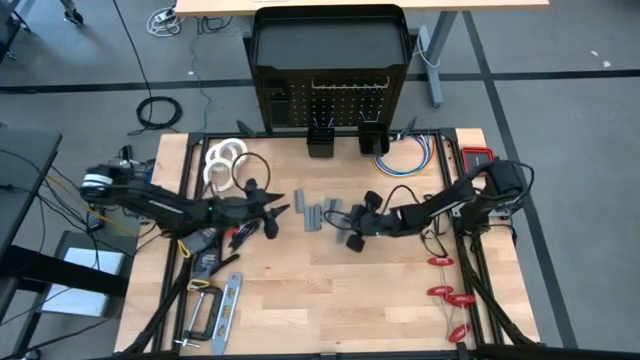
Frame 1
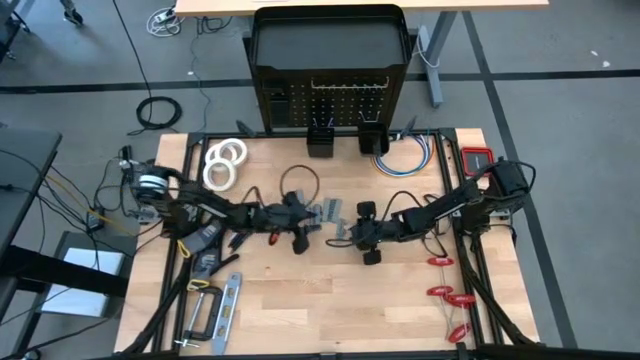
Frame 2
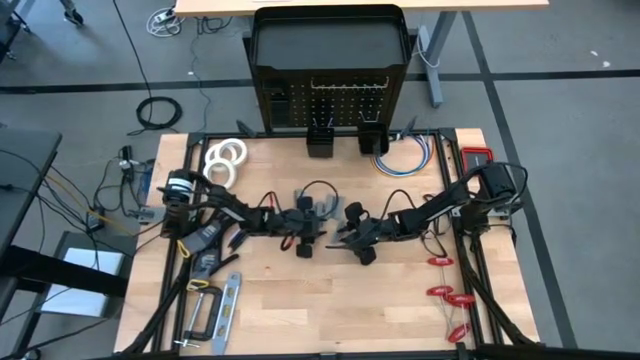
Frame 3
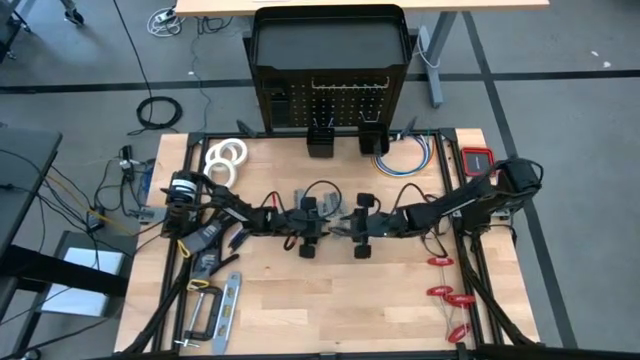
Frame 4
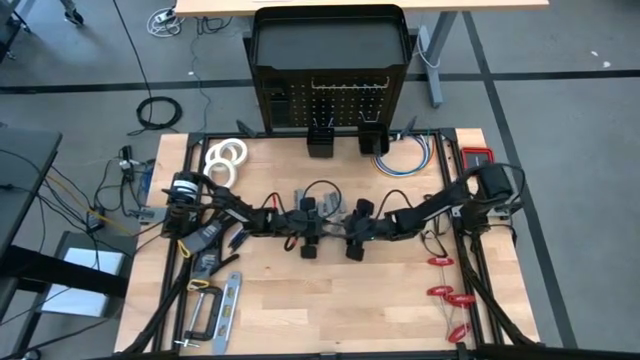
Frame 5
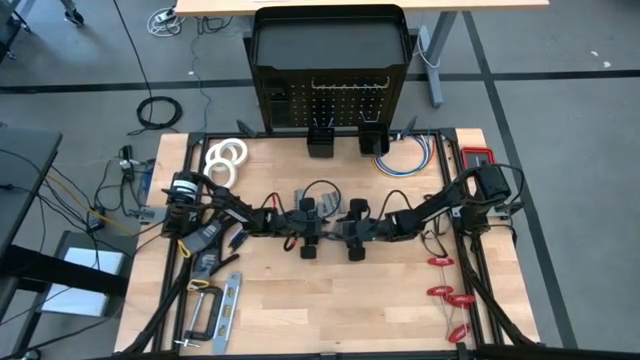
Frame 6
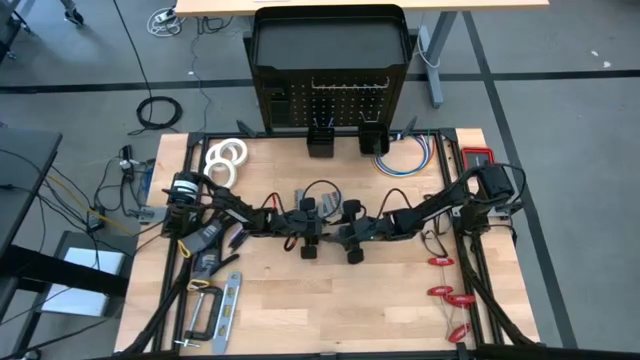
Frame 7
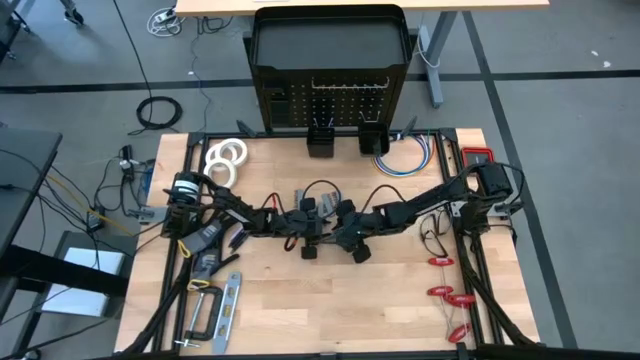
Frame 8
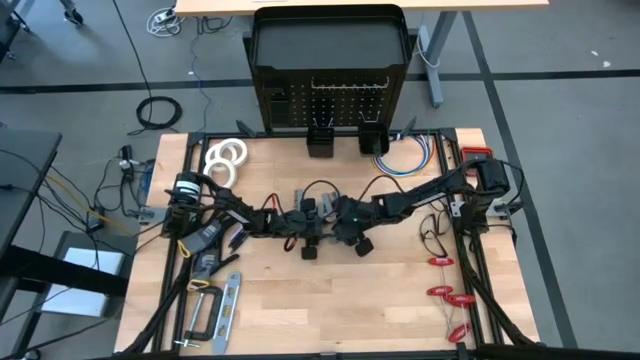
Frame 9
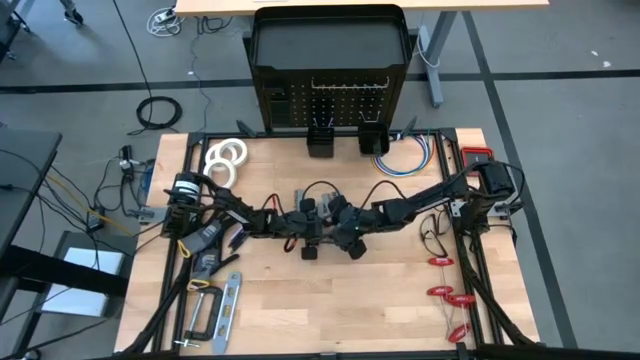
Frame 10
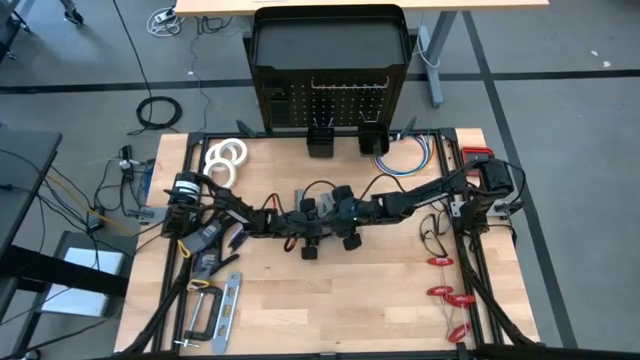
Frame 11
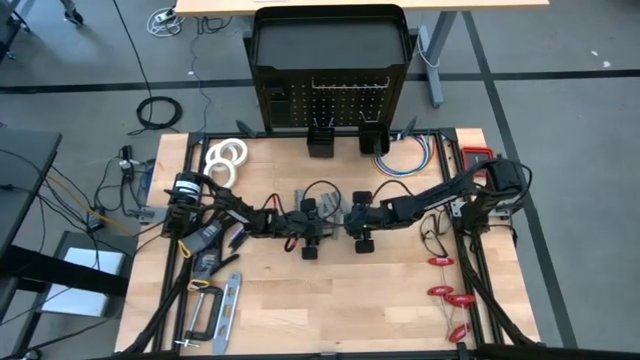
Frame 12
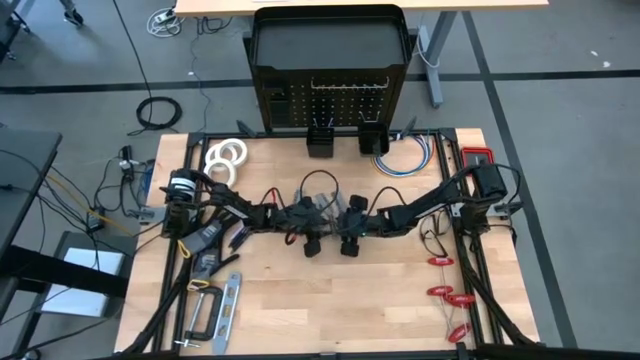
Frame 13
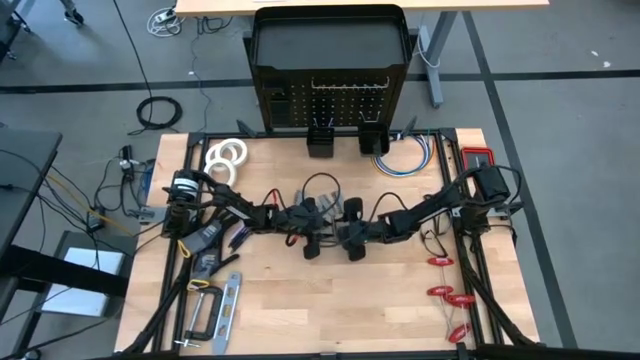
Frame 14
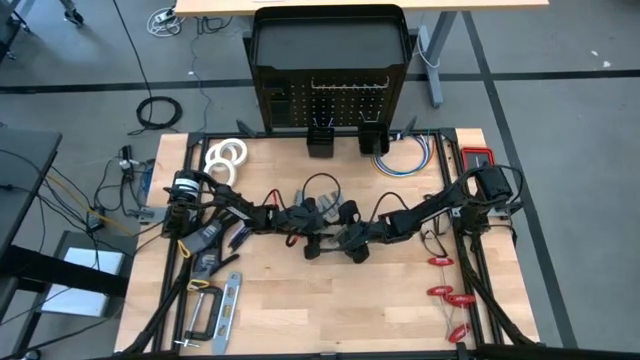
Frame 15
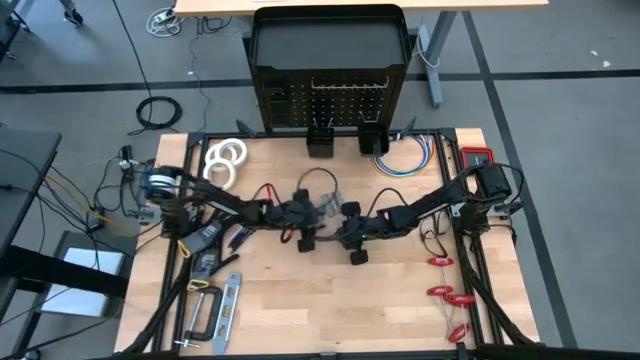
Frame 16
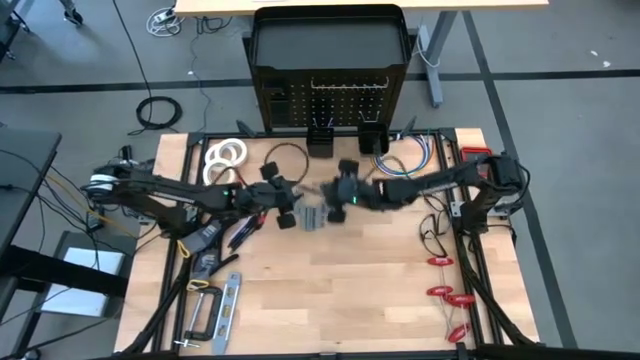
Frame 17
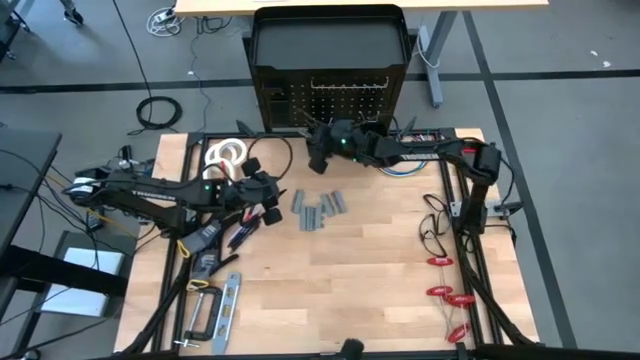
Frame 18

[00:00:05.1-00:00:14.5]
Task: Hang tools onto peg board
Put the terminal block into the left peg board bin

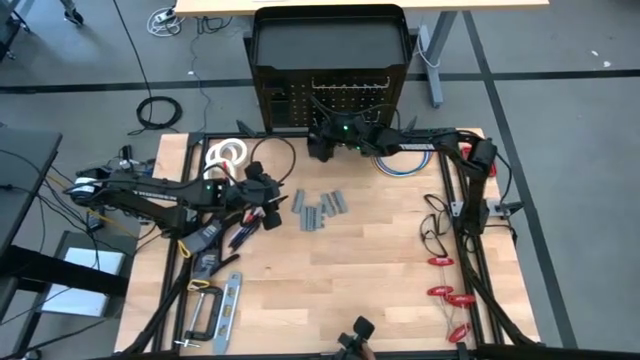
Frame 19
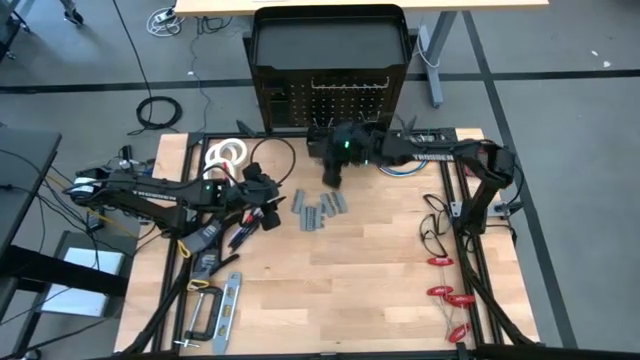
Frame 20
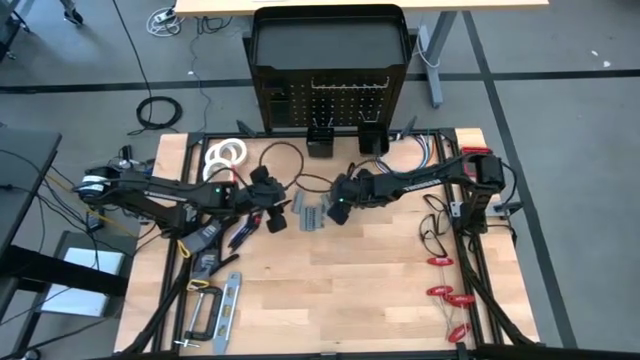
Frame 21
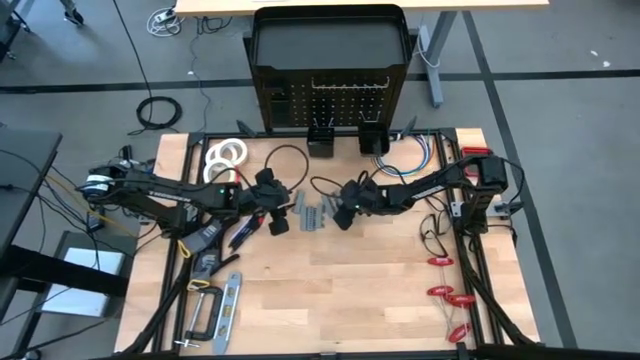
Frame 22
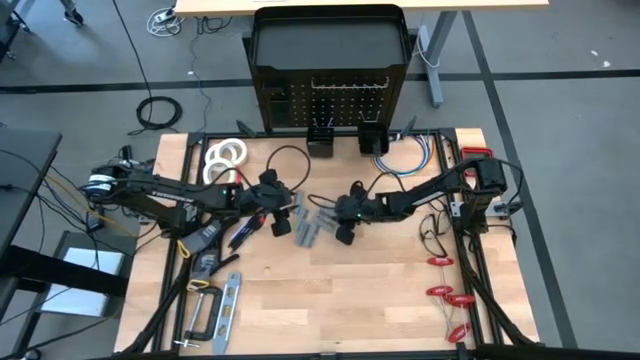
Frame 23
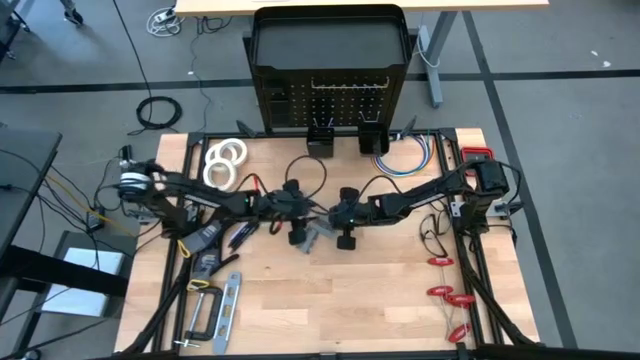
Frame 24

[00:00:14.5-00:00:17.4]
Put the terminal block into the left peg board bin

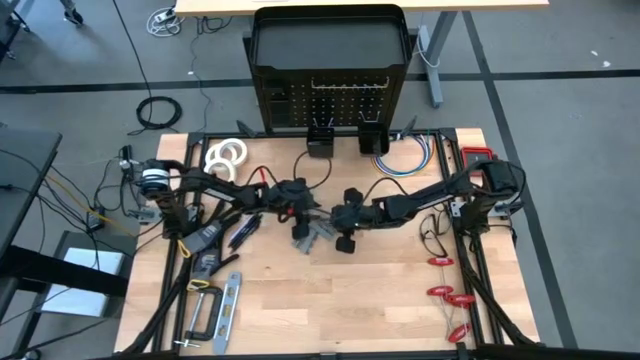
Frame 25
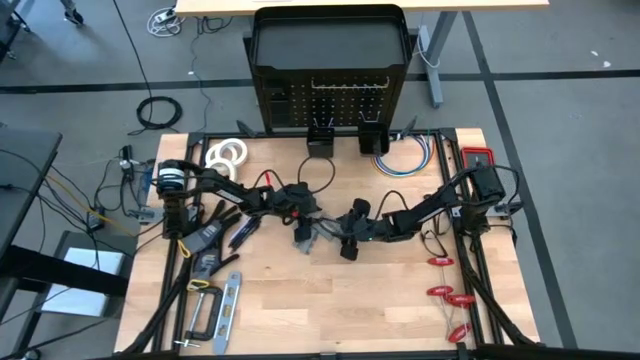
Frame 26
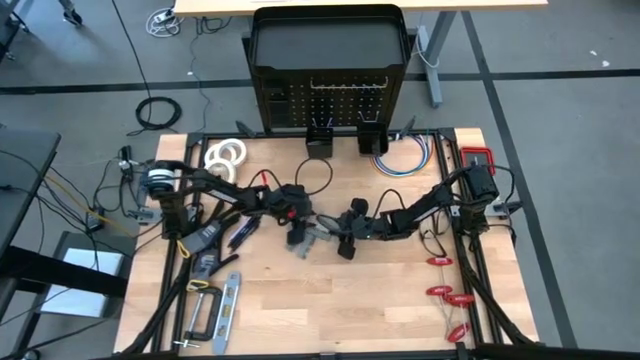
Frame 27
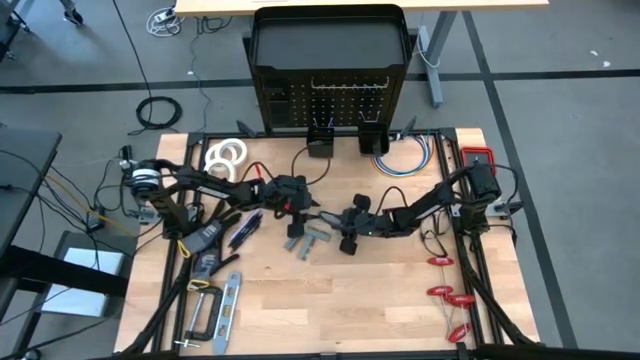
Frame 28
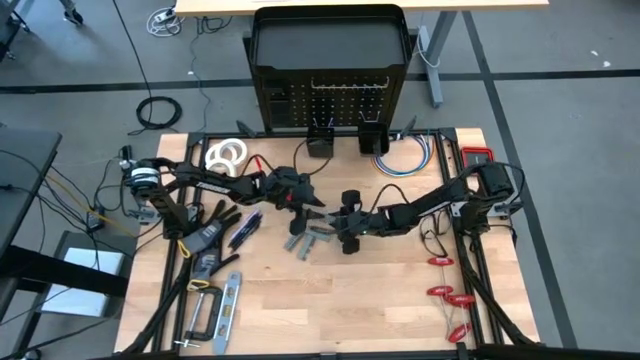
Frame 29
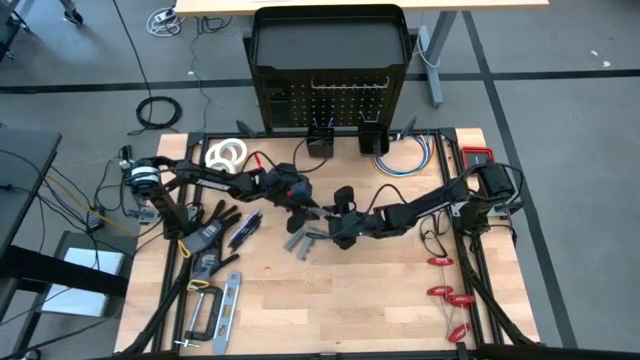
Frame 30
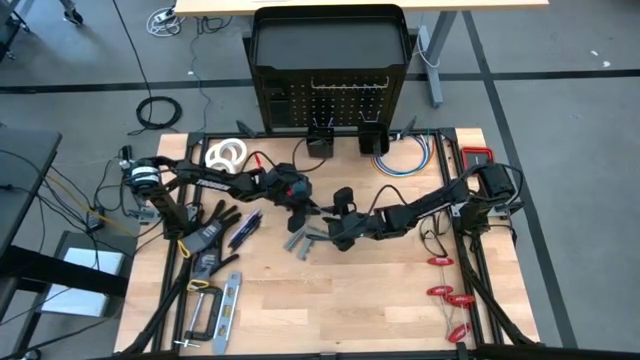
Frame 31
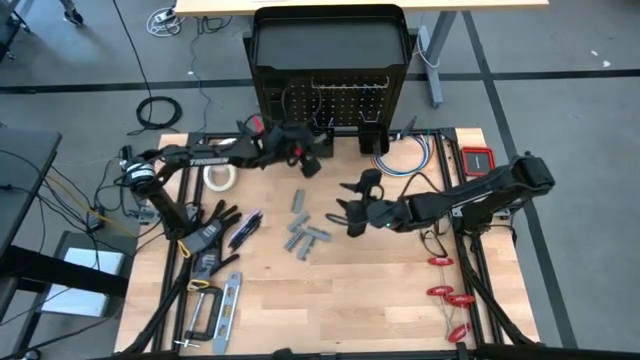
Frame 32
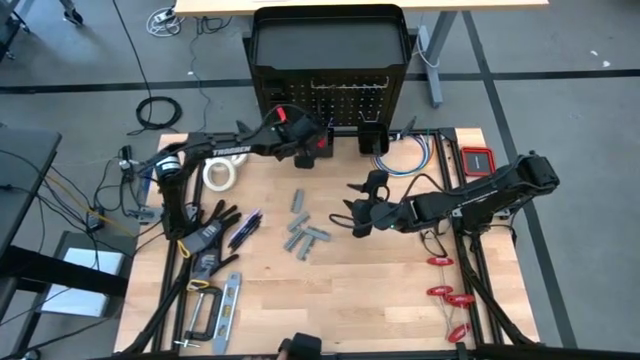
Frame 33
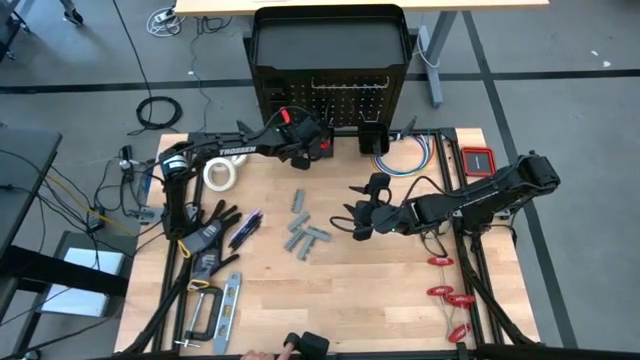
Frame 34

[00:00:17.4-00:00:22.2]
Put the terminal block into the left peg board bin

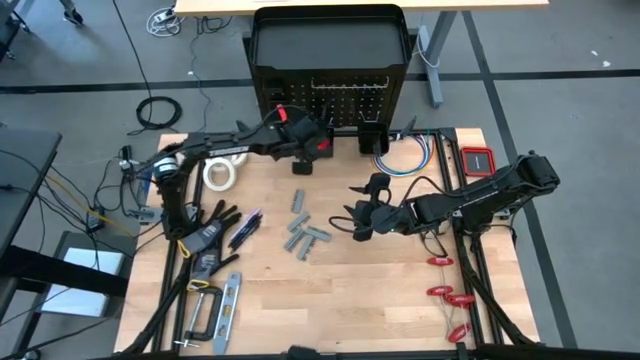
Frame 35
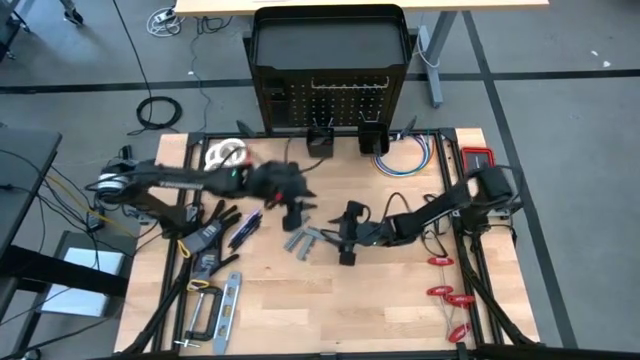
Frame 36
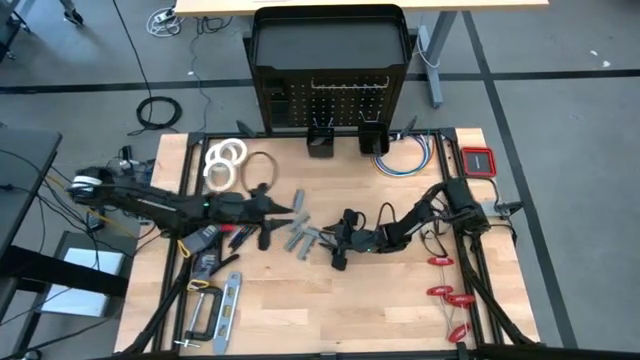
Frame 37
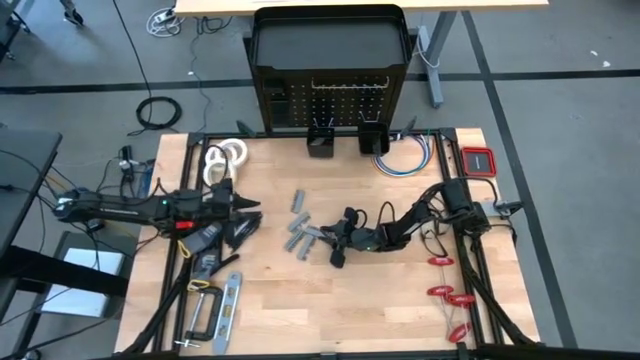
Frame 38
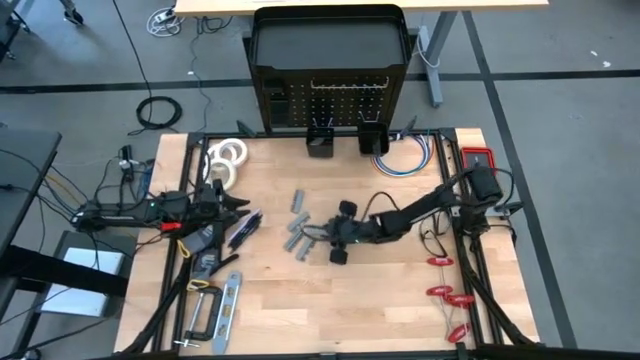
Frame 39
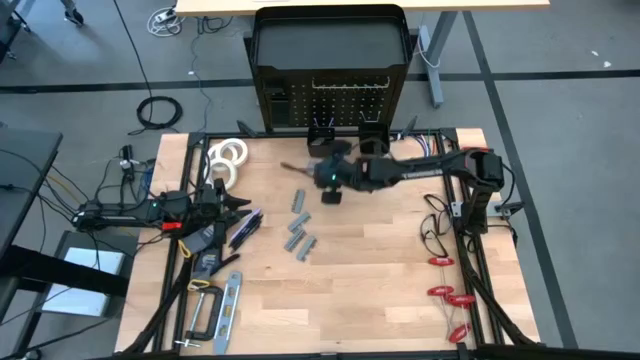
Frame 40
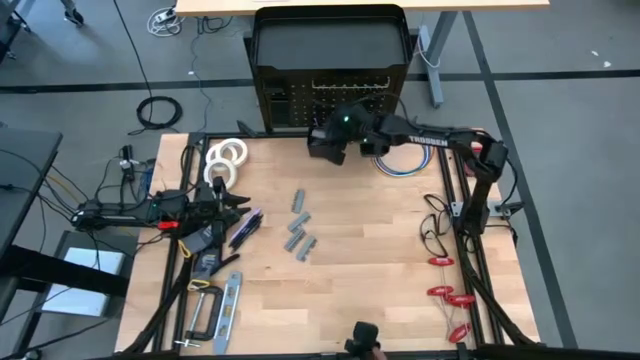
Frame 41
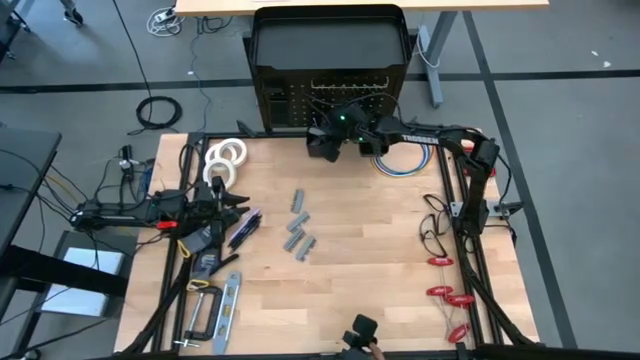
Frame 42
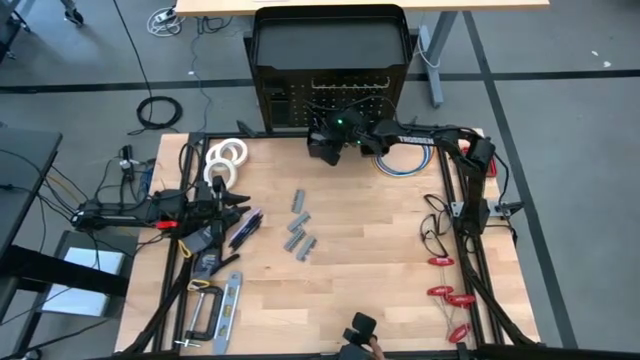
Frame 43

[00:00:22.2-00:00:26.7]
Put the terminal block into the left peg board bin

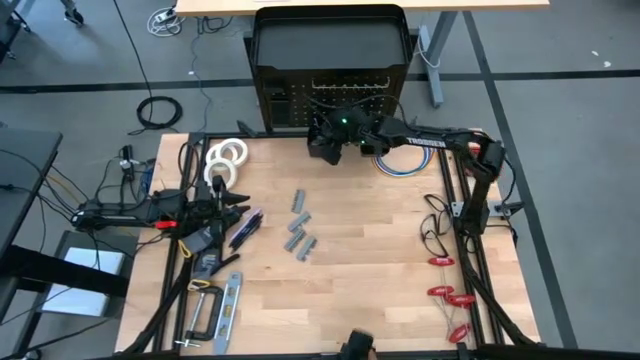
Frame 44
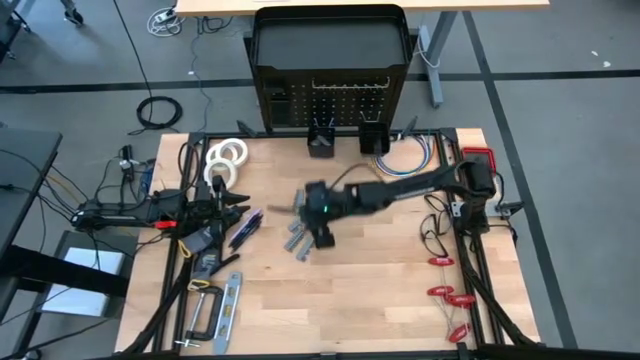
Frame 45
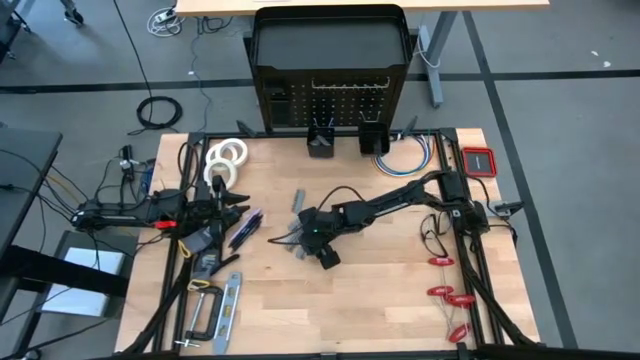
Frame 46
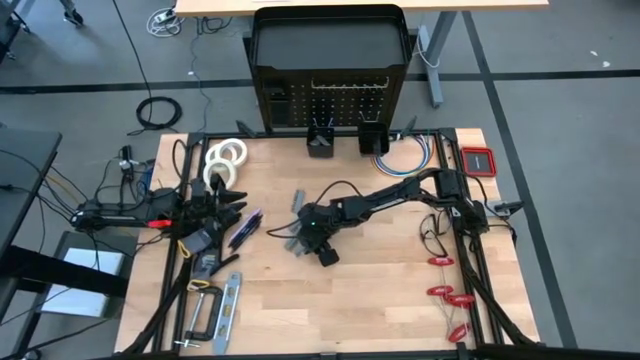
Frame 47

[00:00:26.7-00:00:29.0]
Put the terminal block into the left peg board bin
